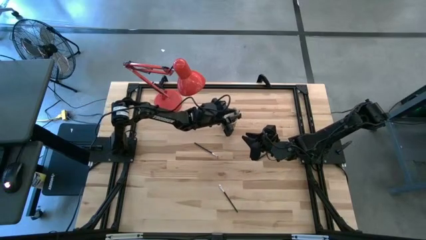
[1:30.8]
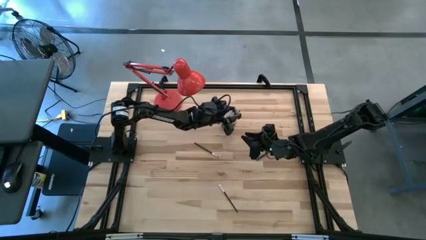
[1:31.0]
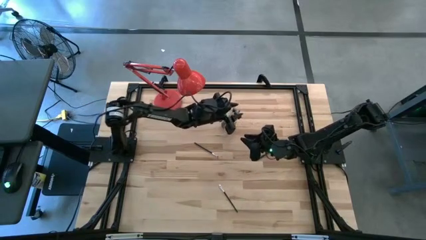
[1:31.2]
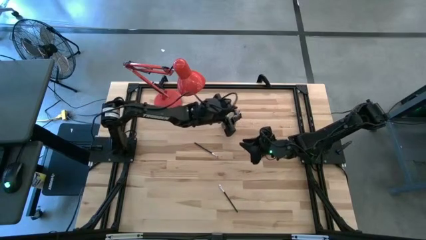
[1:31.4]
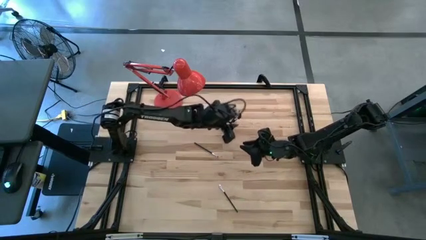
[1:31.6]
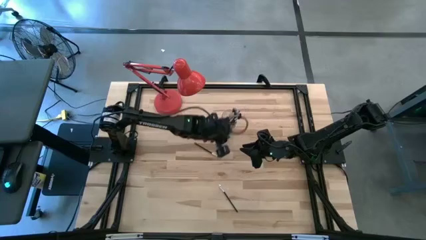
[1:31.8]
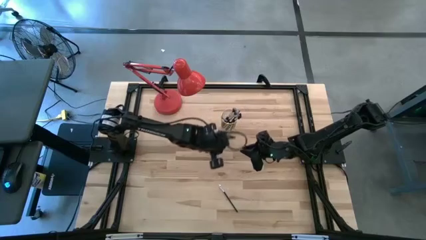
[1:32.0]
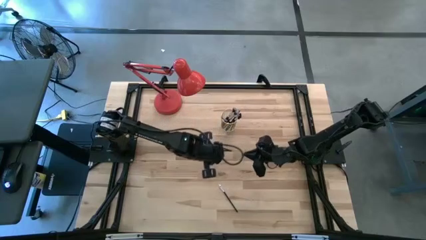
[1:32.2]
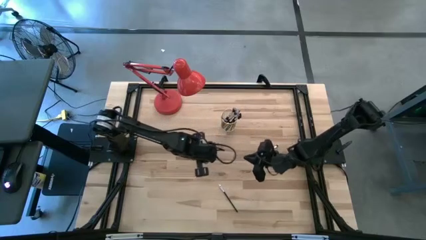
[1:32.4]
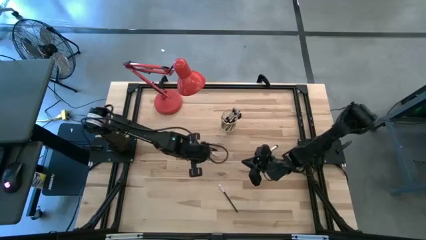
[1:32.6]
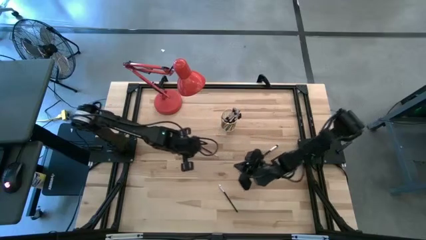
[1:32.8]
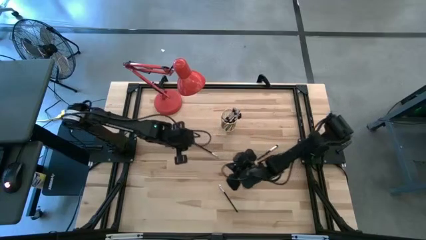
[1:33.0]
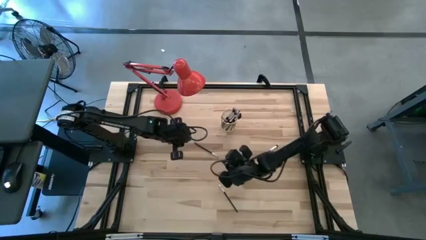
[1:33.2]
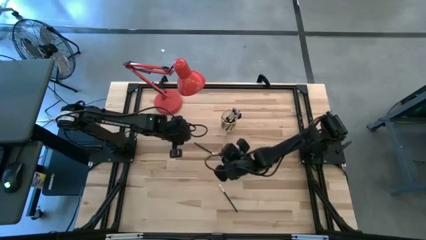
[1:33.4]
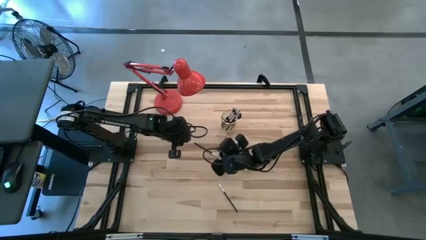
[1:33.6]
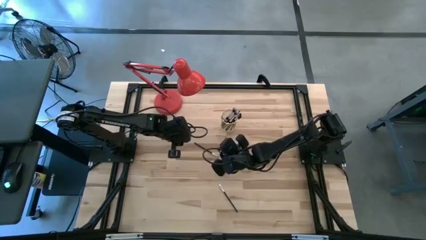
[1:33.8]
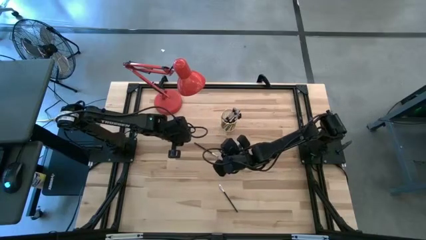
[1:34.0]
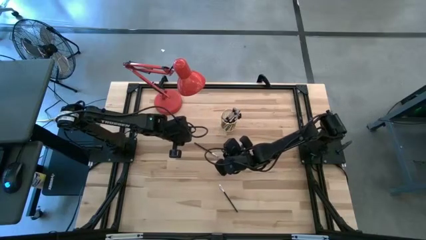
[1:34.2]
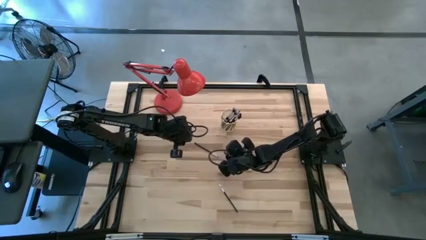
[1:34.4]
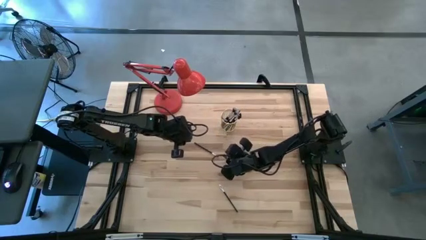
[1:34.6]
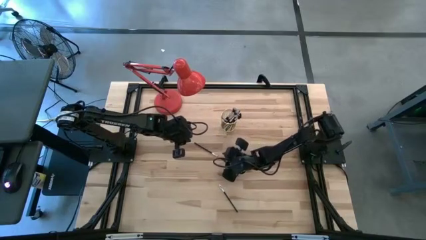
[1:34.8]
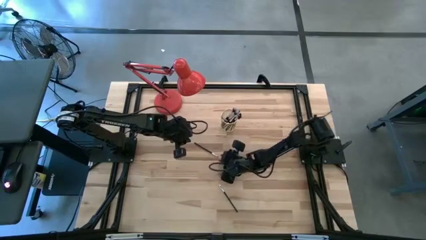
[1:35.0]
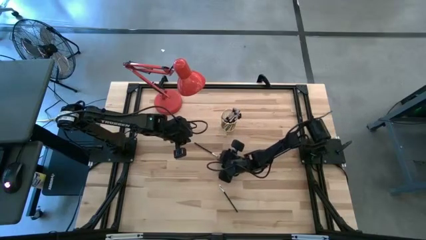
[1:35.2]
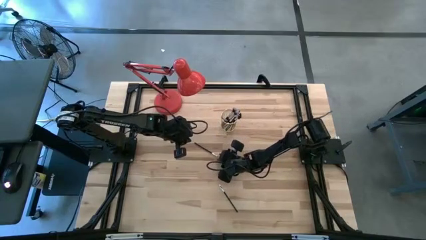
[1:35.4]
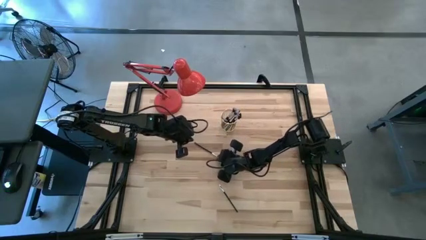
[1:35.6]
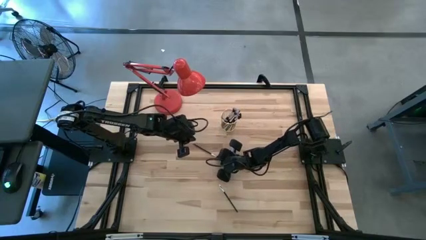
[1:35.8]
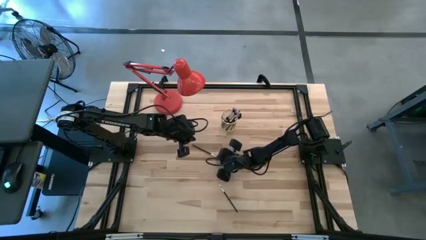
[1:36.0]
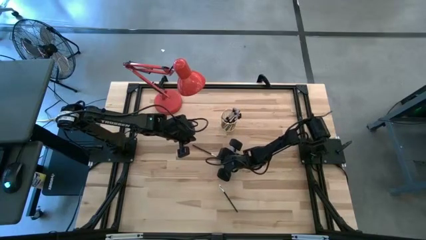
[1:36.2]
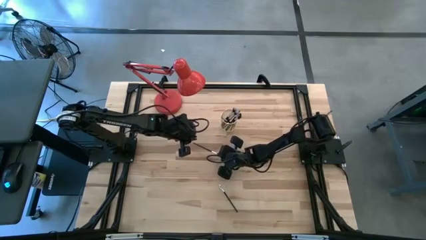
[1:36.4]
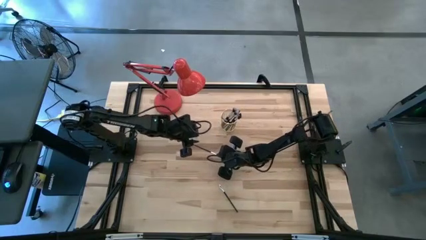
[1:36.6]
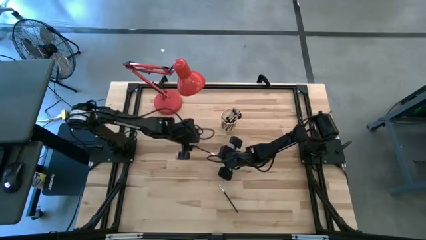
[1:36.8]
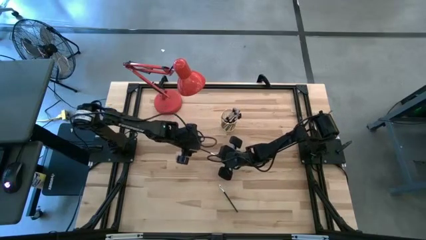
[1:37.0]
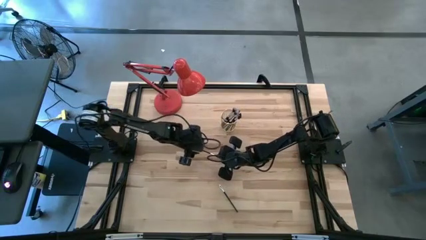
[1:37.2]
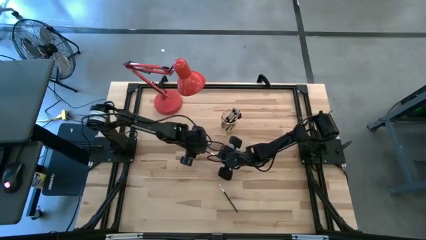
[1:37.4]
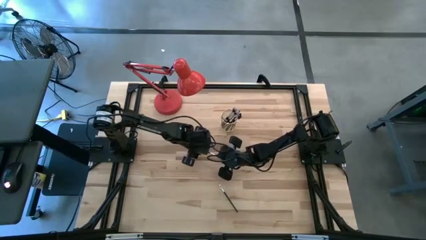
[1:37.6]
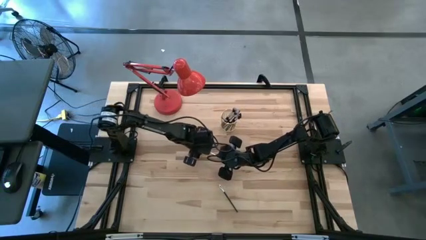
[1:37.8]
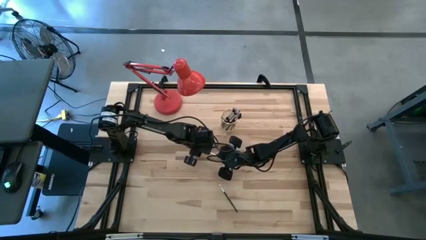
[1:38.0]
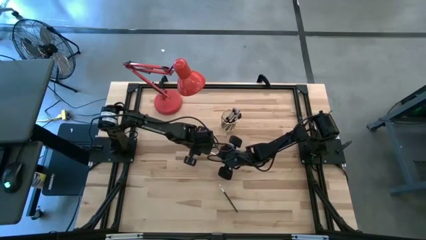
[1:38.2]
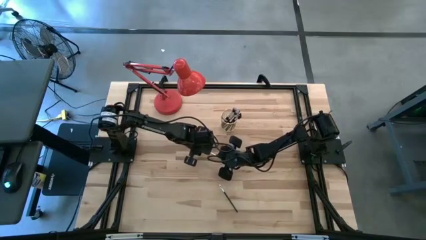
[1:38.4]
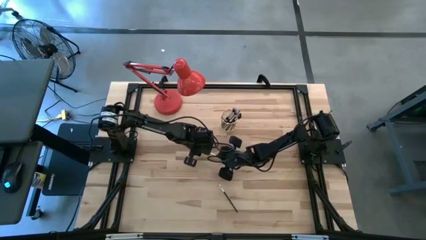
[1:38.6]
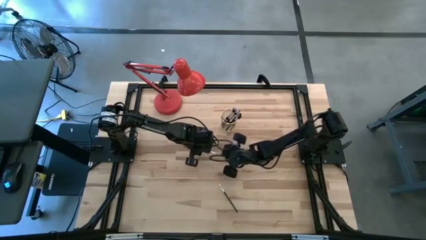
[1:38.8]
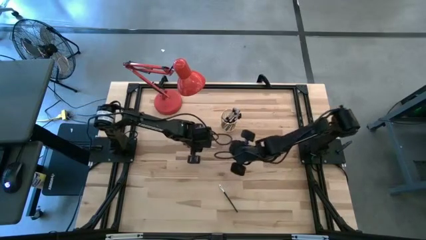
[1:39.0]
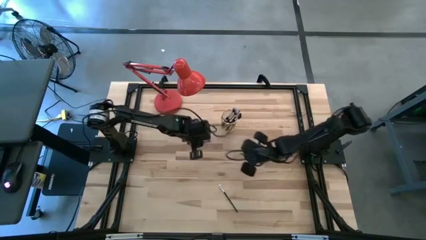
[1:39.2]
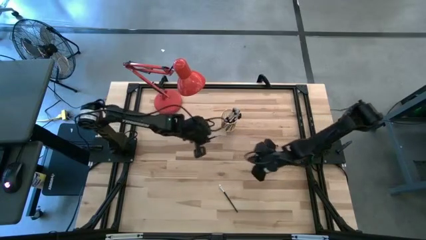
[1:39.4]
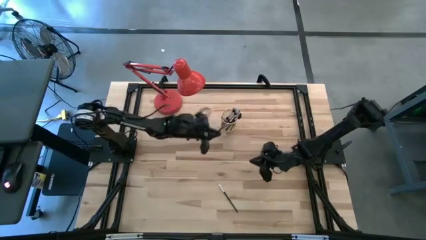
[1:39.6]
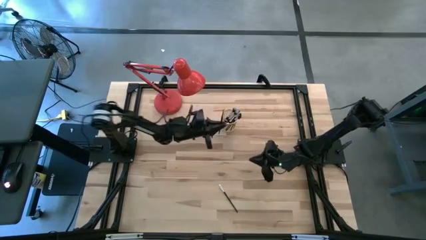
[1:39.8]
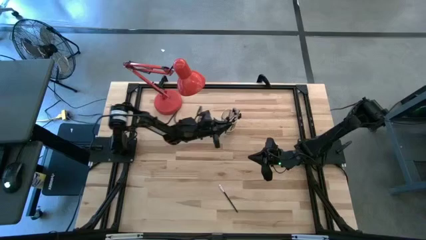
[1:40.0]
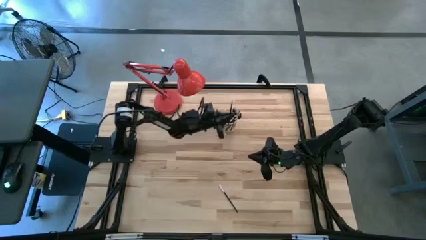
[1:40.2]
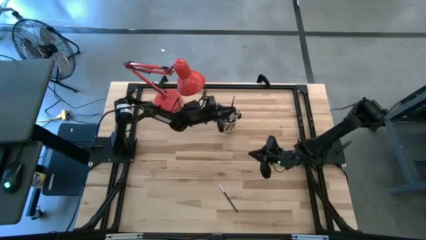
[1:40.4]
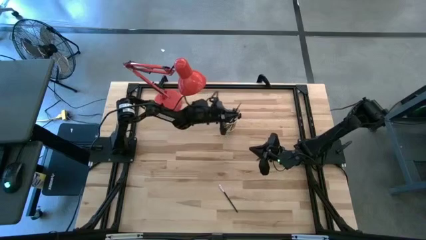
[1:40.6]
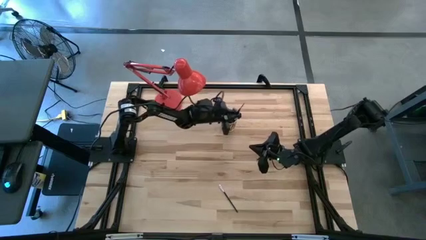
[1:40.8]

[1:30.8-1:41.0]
Task: Put items in baskets/containers
Put the black eyeshadow brush into the yellow container

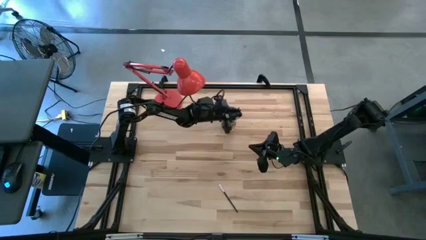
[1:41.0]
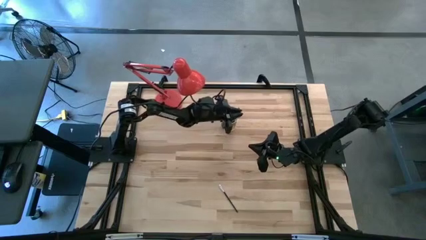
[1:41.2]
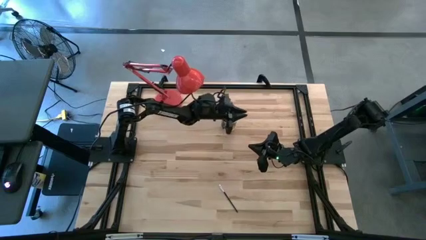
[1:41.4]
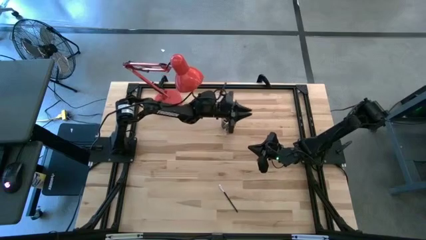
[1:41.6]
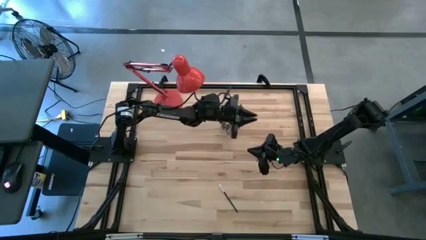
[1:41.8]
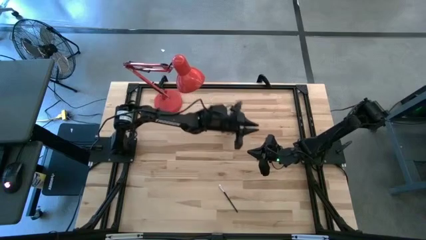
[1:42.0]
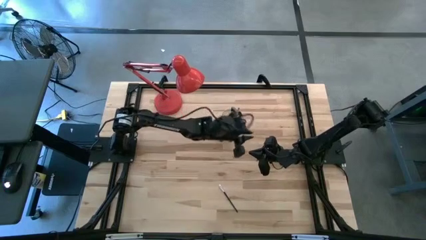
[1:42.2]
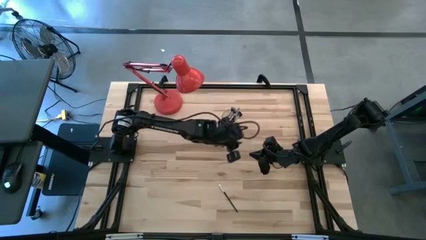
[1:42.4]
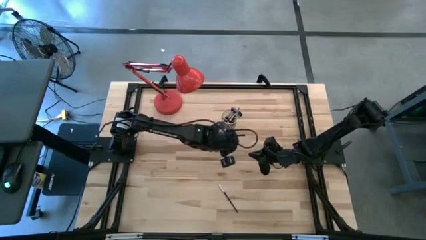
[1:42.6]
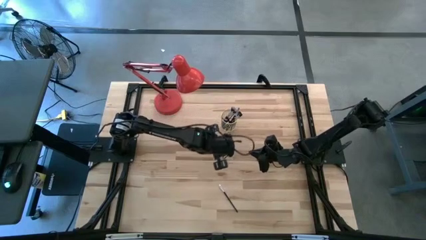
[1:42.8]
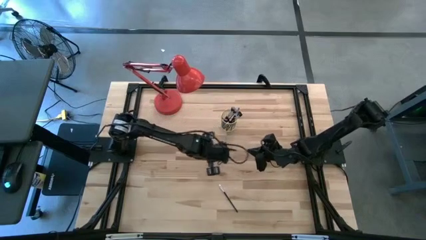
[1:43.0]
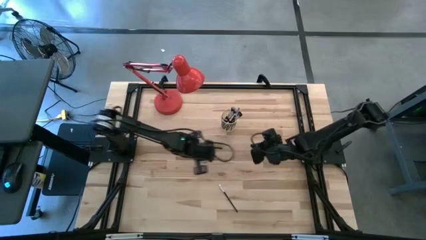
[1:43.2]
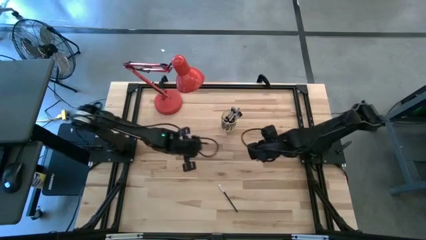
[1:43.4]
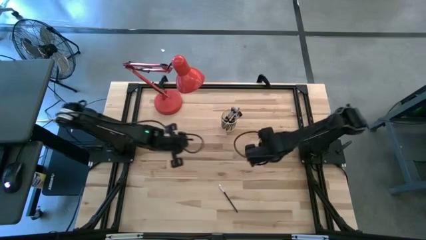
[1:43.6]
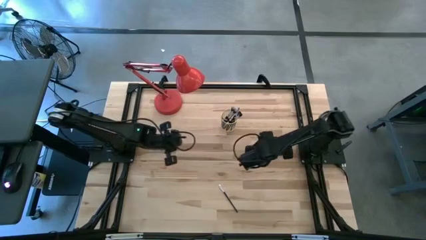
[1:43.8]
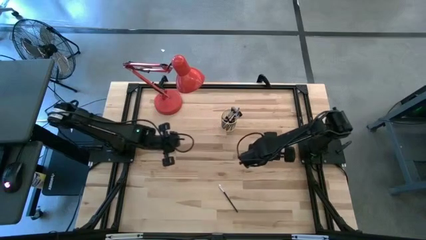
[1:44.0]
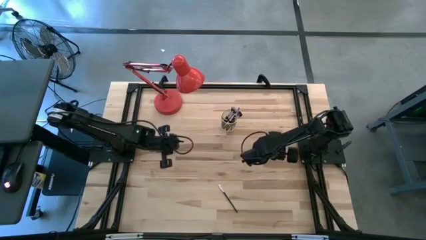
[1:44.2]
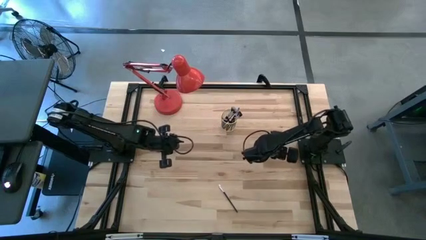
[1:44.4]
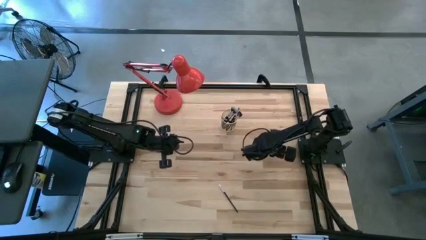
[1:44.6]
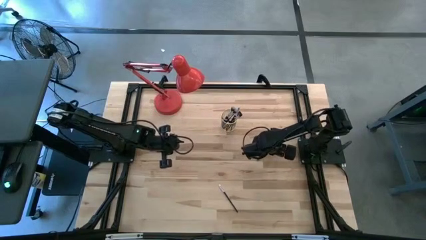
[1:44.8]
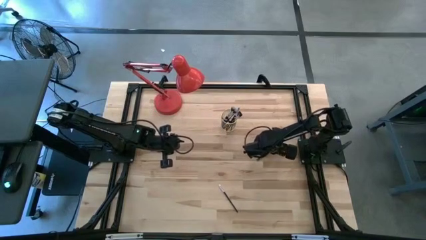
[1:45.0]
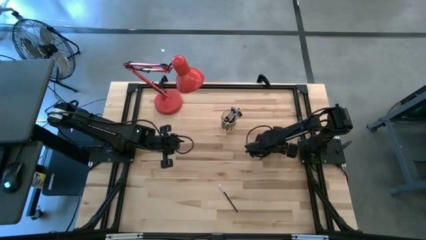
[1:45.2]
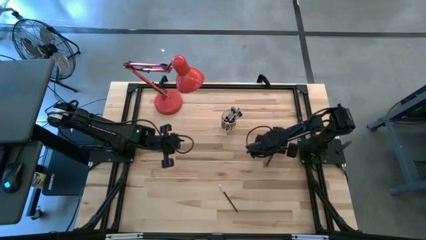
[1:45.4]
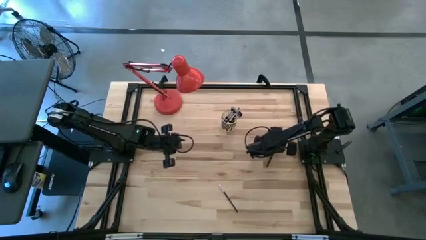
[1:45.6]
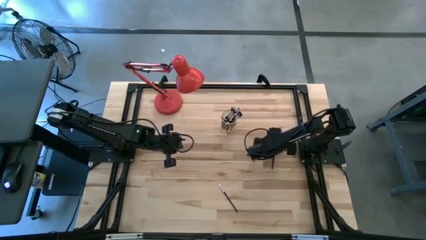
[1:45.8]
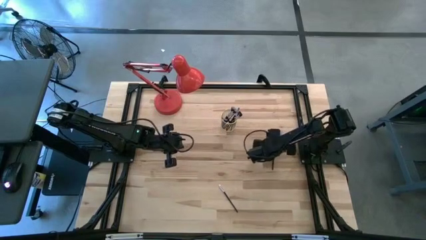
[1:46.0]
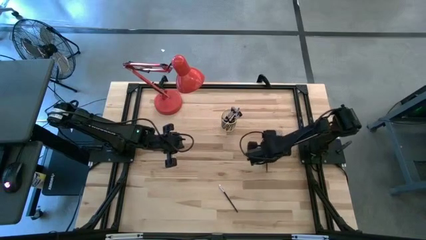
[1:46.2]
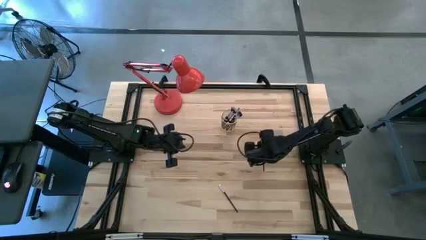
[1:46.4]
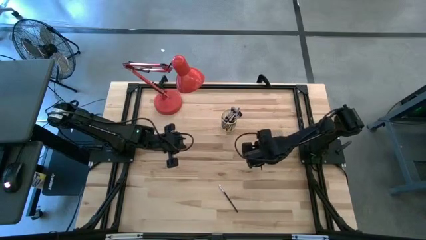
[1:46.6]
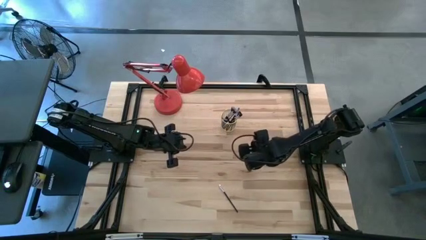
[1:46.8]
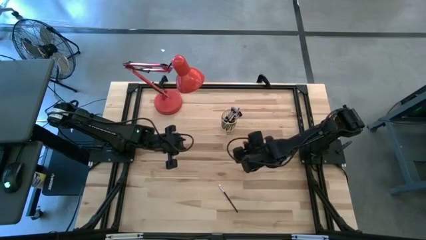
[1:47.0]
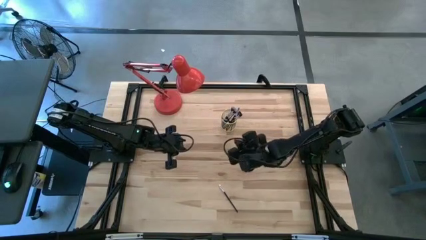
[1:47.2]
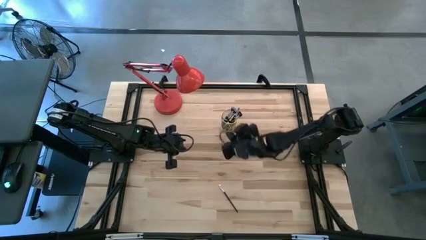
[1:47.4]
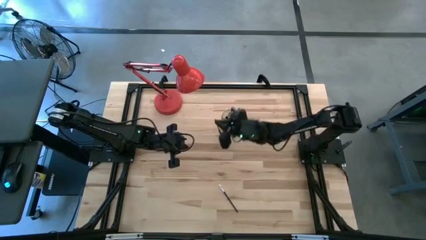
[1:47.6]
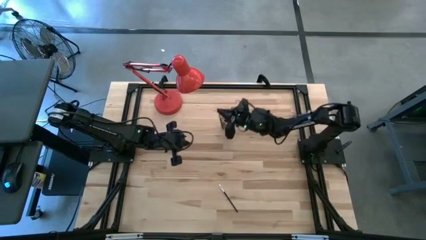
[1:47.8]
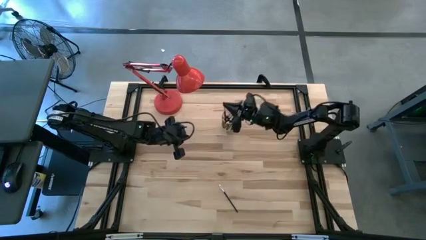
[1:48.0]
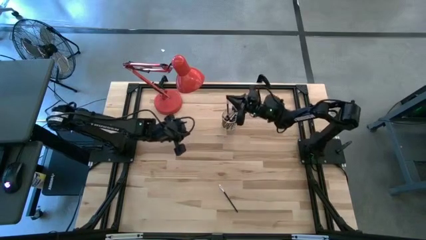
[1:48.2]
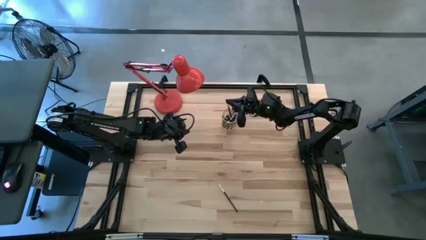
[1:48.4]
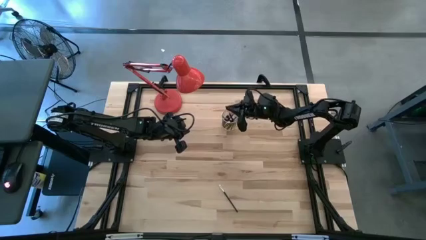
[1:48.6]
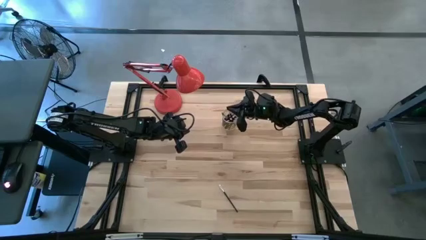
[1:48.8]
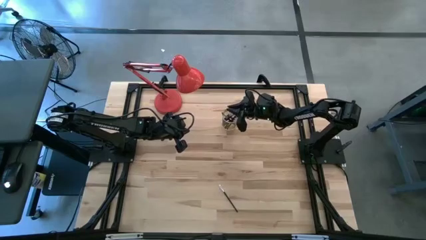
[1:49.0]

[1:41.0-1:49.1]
Put the black eyeshadow brush into the yellow container
